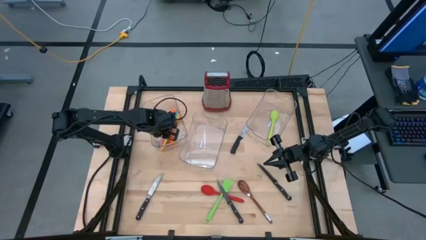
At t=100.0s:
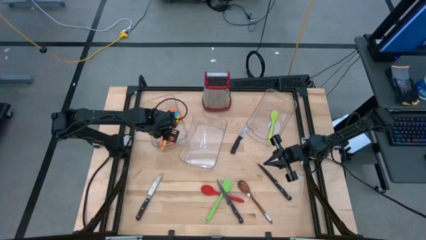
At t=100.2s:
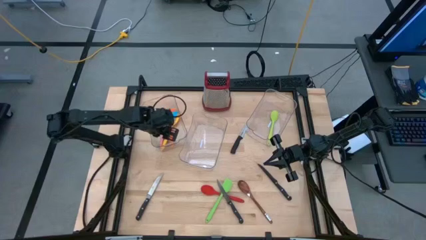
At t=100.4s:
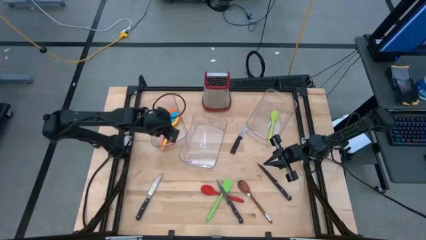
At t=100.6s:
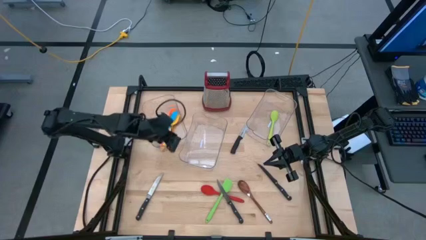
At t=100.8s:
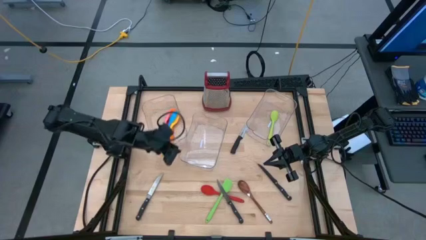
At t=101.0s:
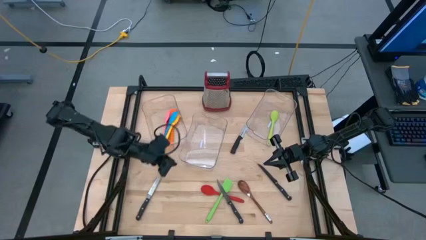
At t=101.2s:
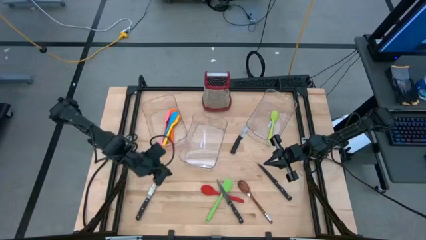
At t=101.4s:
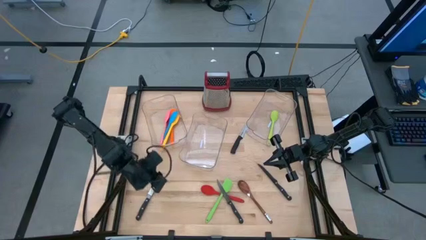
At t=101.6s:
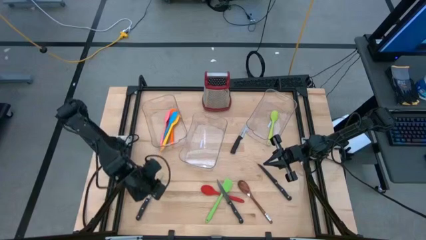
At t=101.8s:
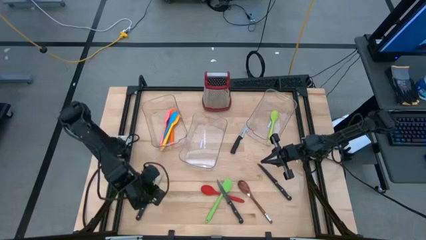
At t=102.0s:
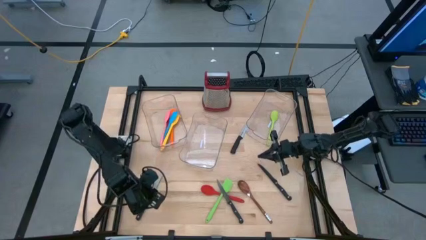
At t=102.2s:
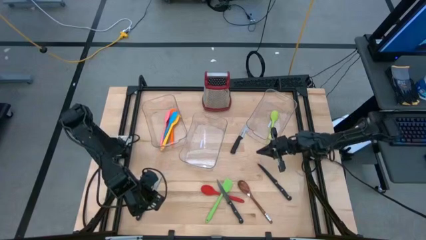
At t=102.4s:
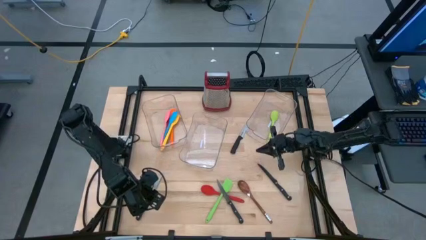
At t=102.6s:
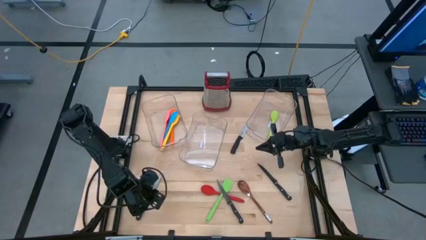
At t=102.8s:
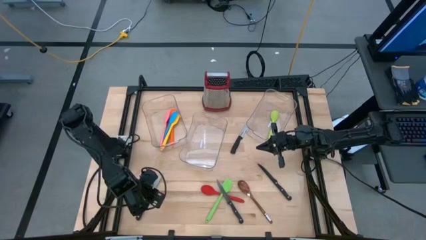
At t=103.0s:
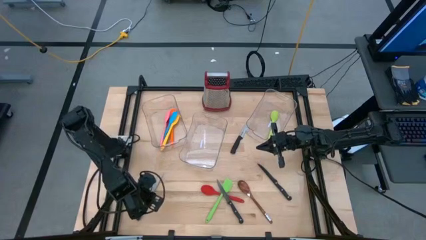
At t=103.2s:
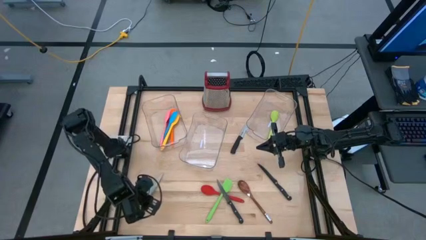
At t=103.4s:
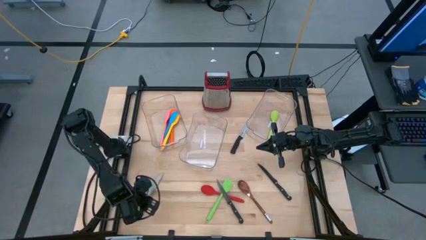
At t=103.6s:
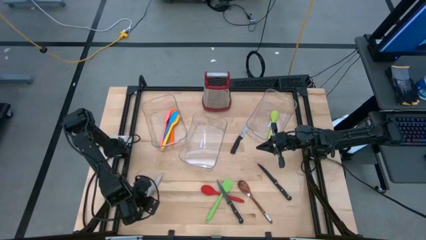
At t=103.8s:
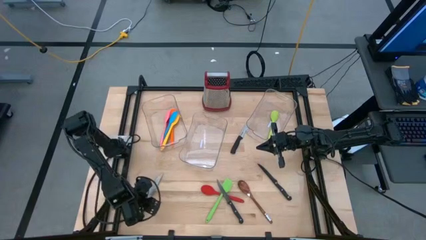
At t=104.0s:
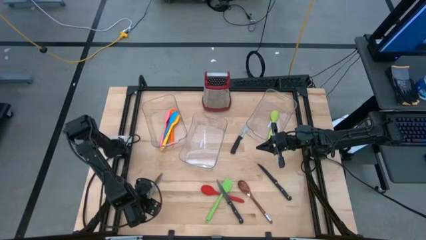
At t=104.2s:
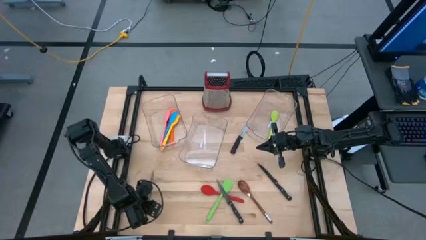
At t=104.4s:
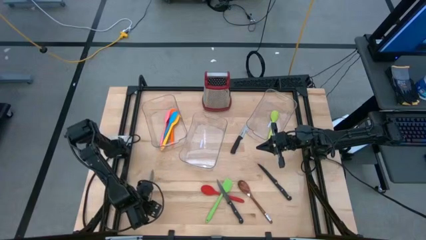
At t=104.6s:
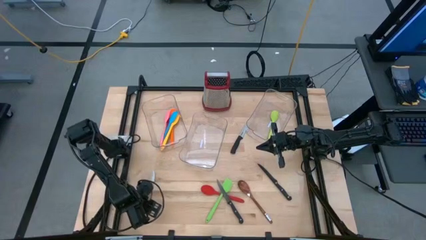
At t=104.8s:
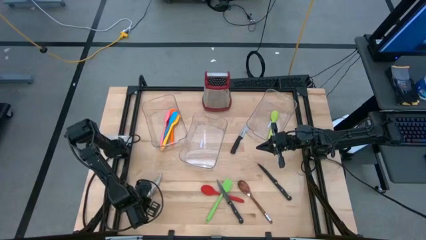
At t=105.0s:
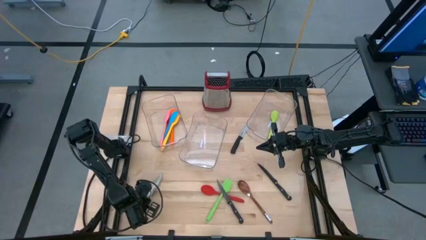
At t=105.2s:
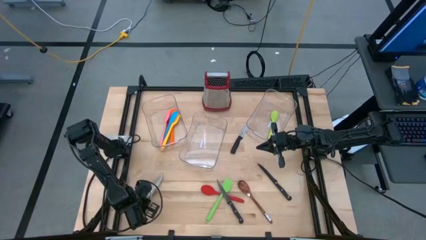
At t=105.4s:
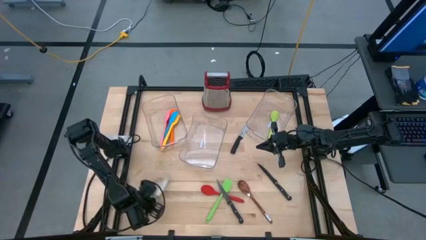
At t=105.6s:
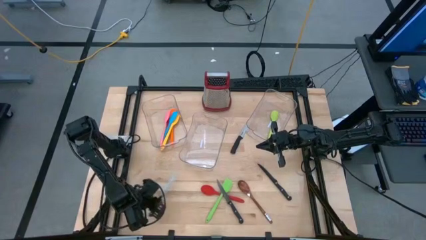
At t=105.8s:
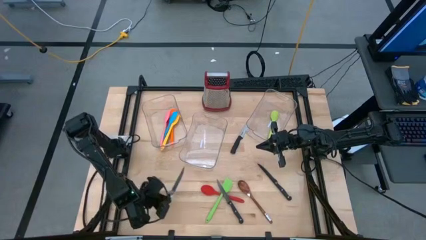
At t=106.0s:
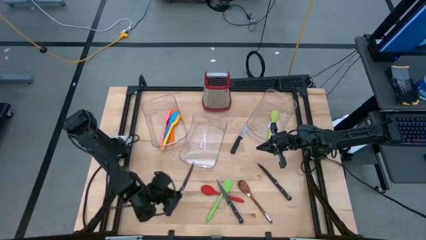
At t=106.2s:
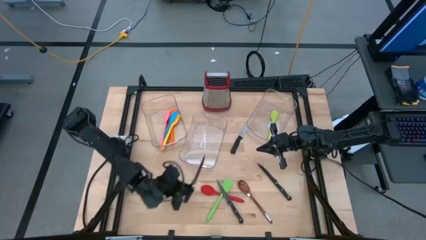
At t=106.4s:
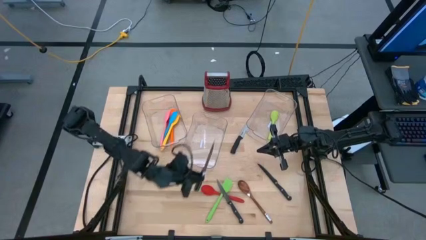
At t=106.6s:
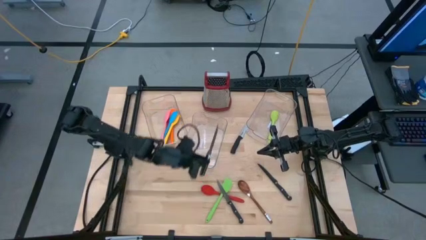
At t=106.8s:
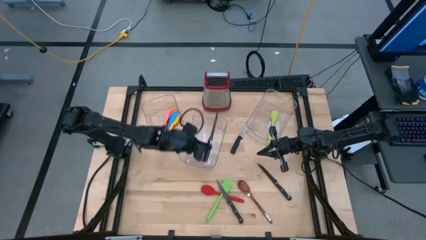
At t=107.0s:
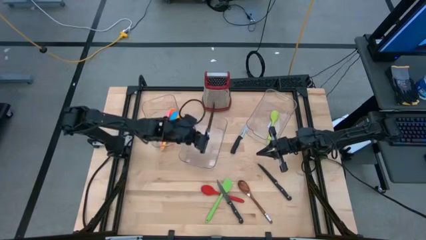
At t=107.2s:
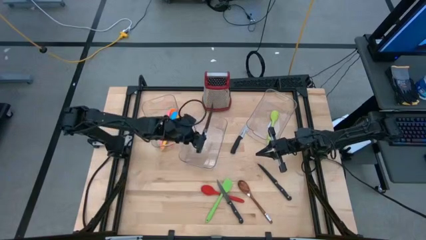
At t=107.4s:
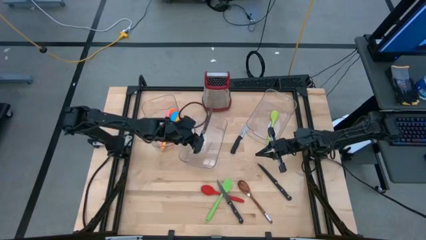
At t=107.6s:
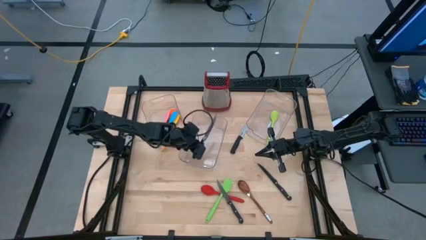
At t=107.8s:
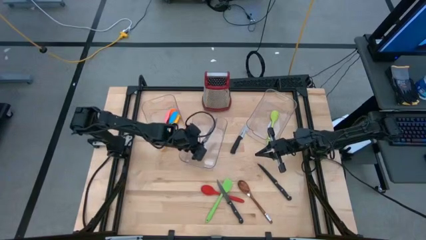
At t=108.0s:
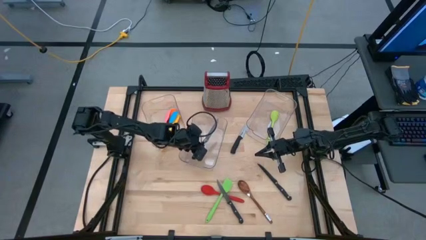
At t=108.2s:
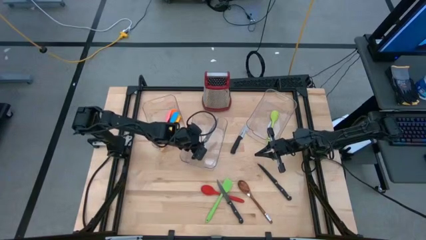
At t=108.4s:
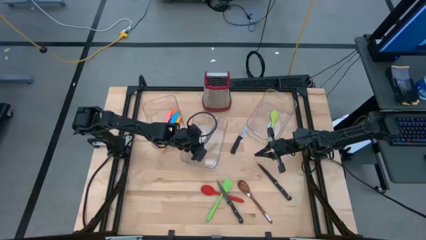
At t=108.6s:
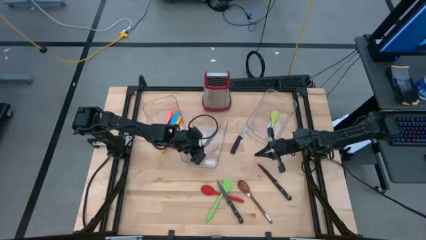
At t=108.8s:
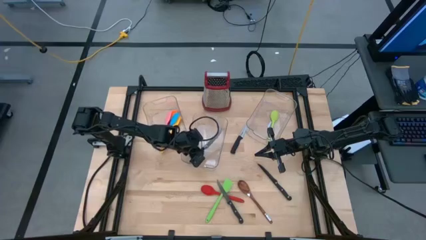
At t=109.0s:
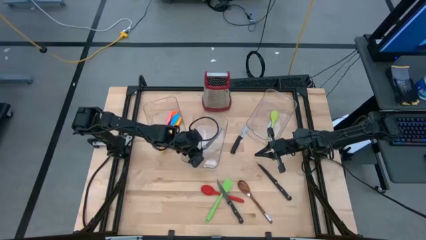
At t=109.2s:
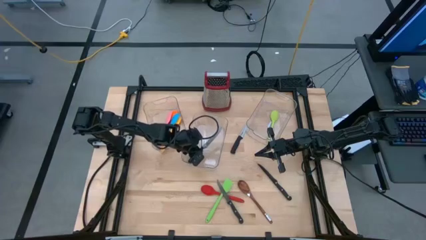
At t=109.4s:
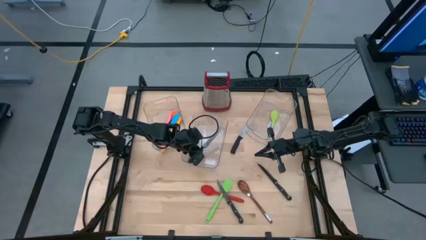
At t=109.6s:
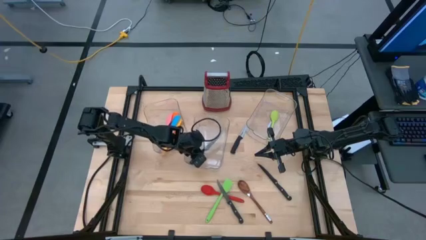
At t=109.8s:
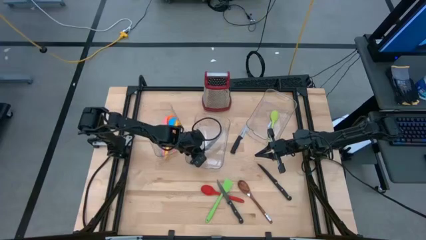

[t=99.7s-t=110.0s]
Task: Pick & Place Kitchen Items
Put the black knife into the middle transparent bin
